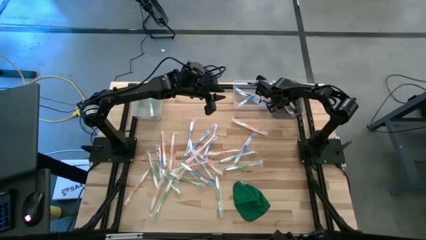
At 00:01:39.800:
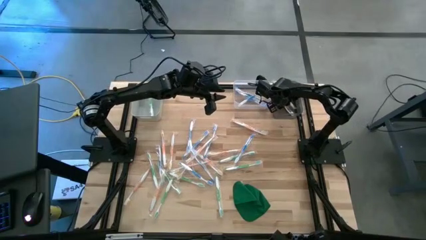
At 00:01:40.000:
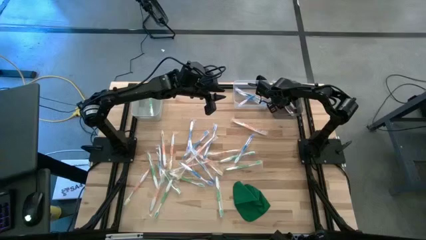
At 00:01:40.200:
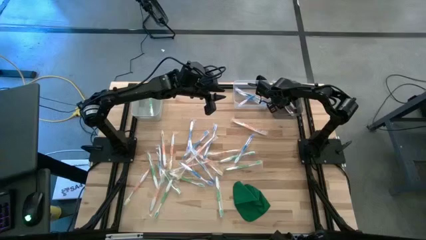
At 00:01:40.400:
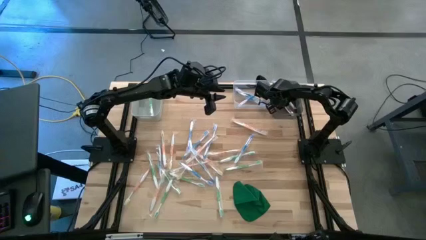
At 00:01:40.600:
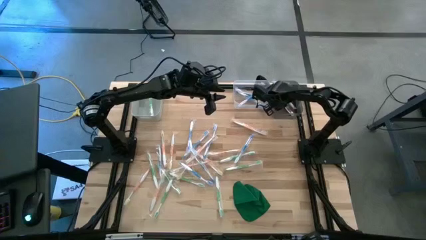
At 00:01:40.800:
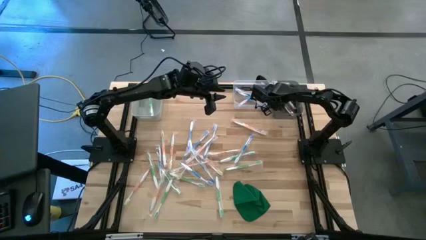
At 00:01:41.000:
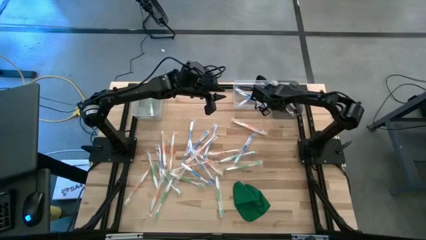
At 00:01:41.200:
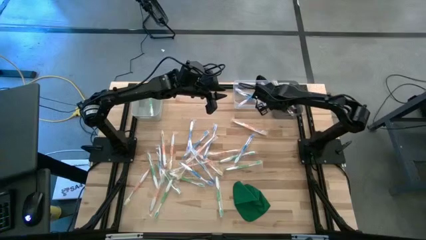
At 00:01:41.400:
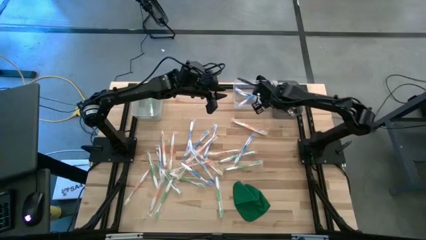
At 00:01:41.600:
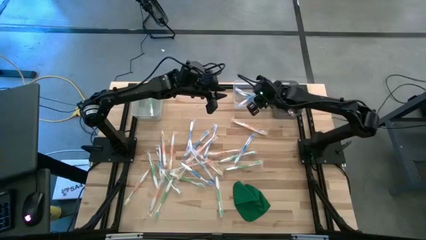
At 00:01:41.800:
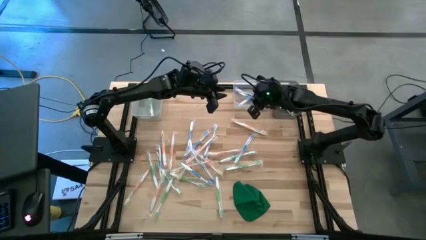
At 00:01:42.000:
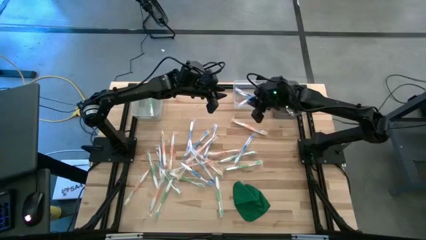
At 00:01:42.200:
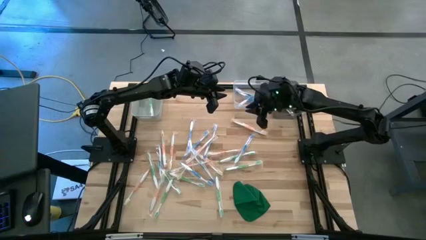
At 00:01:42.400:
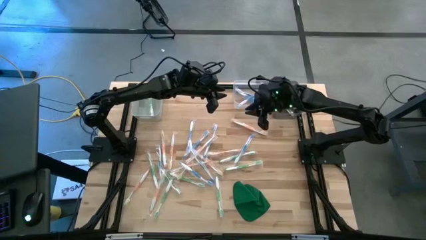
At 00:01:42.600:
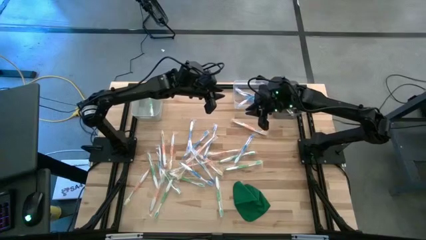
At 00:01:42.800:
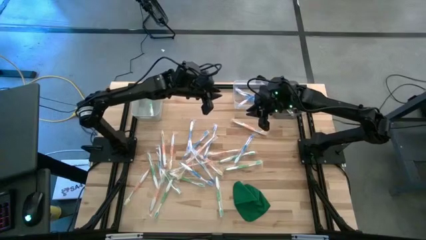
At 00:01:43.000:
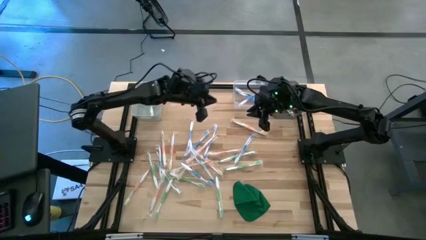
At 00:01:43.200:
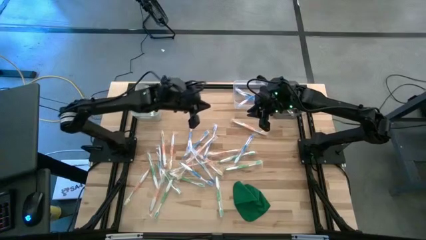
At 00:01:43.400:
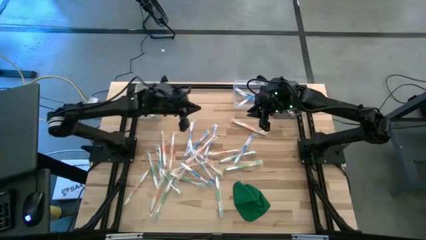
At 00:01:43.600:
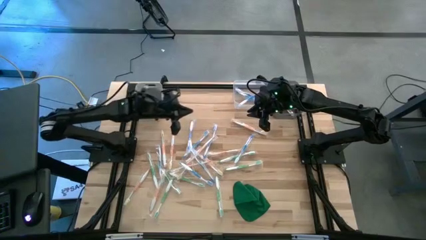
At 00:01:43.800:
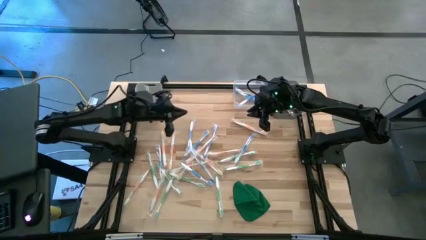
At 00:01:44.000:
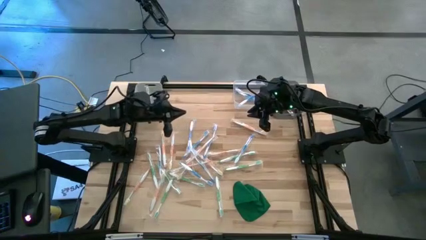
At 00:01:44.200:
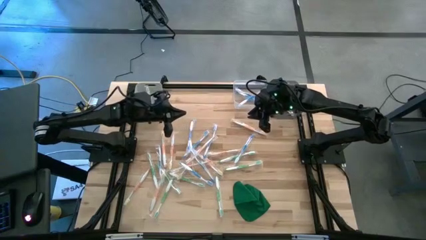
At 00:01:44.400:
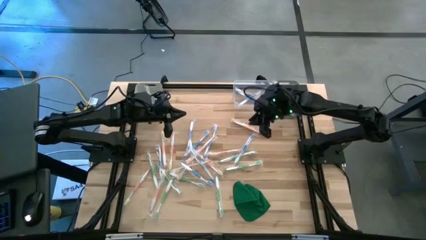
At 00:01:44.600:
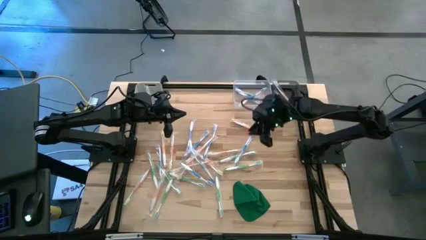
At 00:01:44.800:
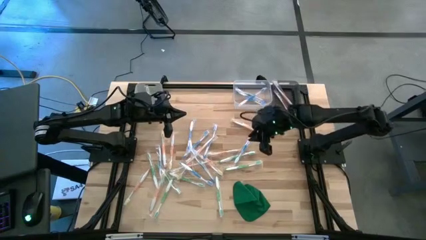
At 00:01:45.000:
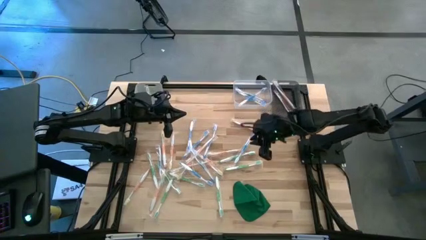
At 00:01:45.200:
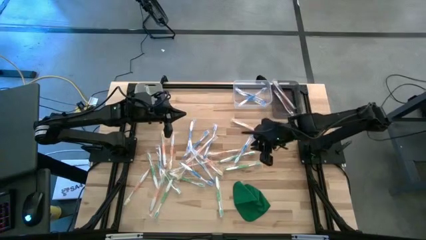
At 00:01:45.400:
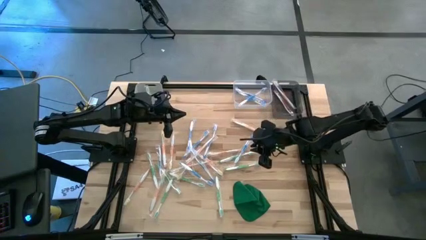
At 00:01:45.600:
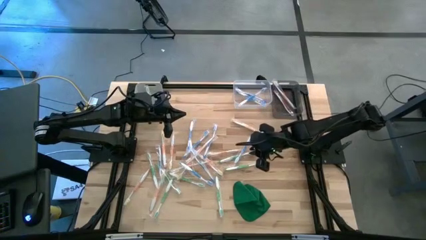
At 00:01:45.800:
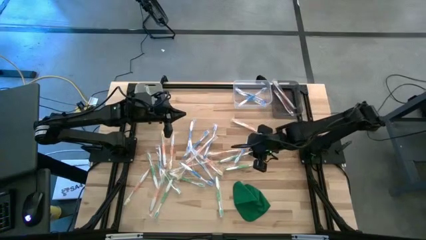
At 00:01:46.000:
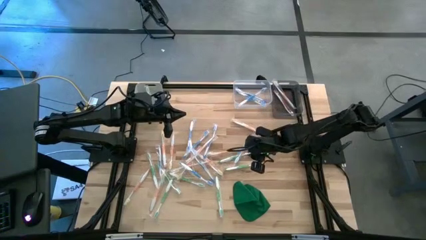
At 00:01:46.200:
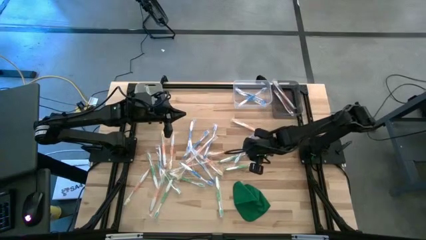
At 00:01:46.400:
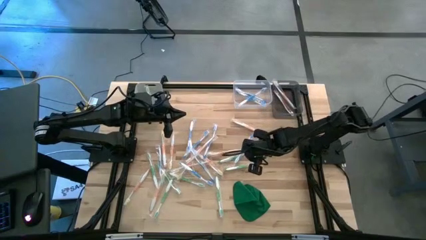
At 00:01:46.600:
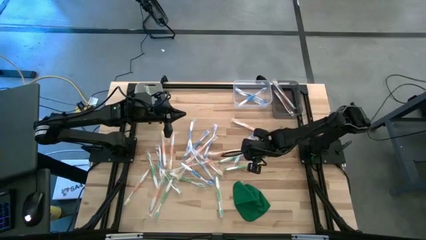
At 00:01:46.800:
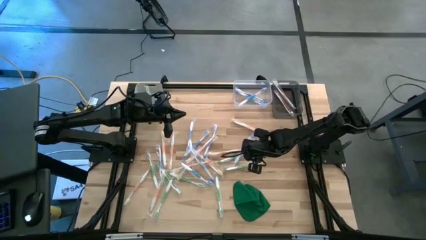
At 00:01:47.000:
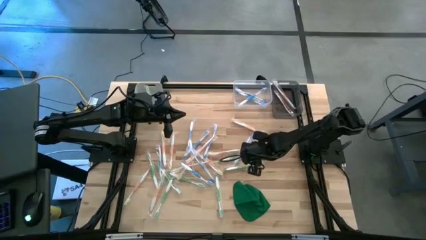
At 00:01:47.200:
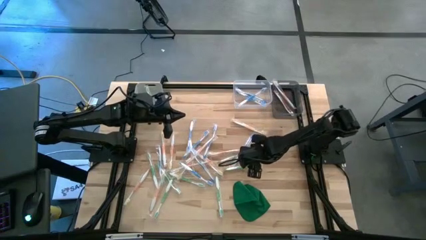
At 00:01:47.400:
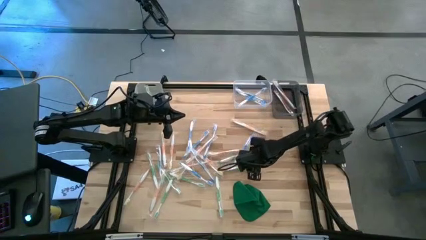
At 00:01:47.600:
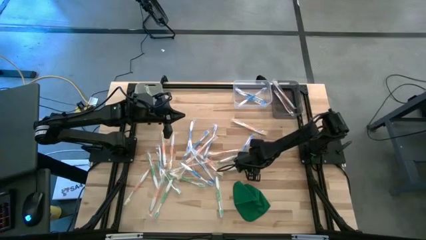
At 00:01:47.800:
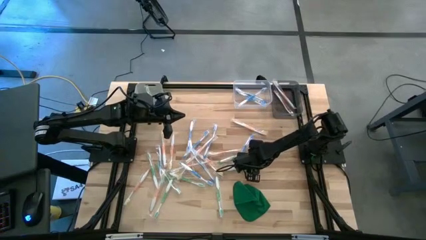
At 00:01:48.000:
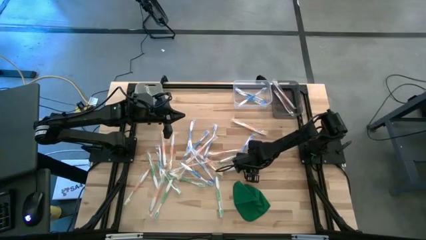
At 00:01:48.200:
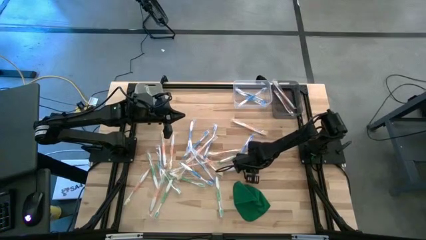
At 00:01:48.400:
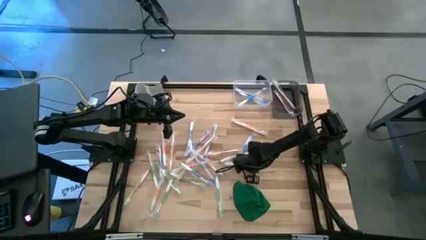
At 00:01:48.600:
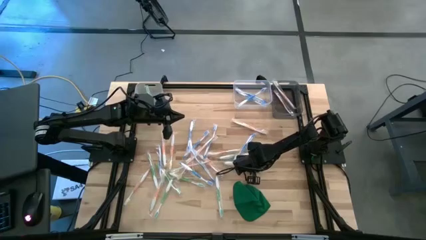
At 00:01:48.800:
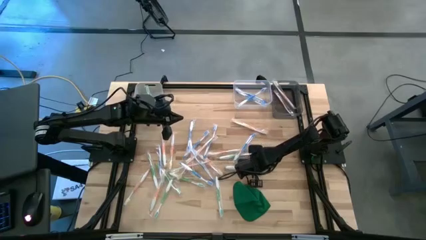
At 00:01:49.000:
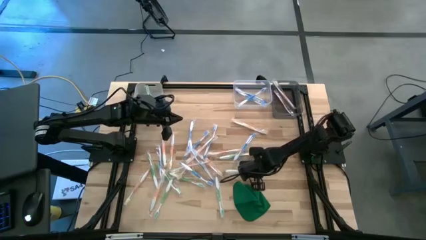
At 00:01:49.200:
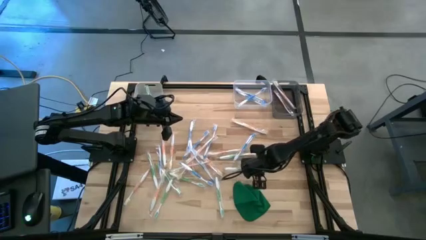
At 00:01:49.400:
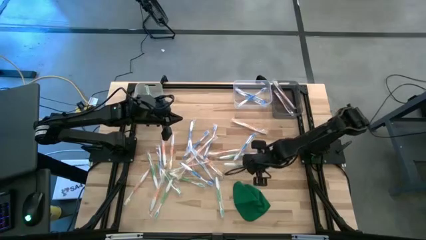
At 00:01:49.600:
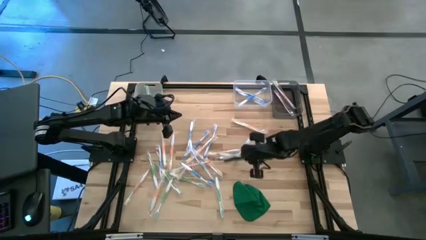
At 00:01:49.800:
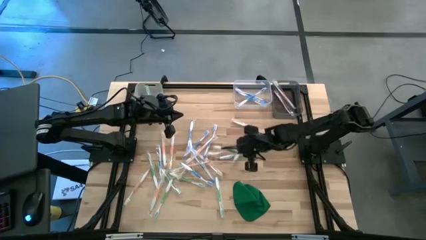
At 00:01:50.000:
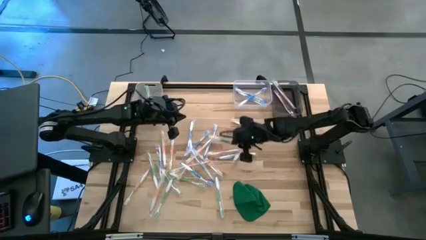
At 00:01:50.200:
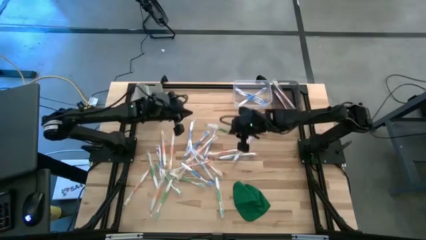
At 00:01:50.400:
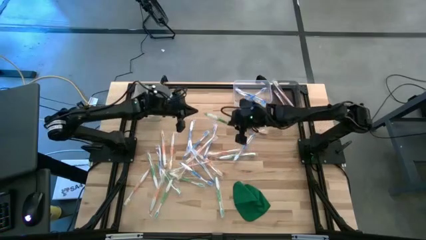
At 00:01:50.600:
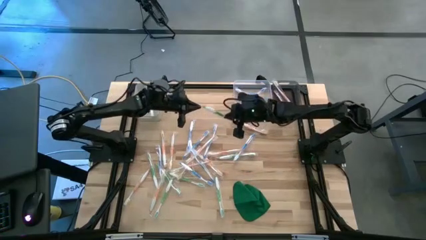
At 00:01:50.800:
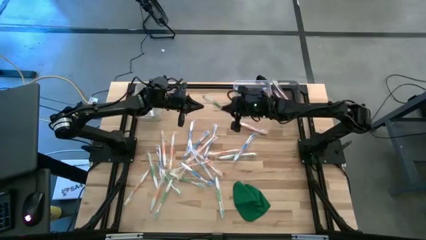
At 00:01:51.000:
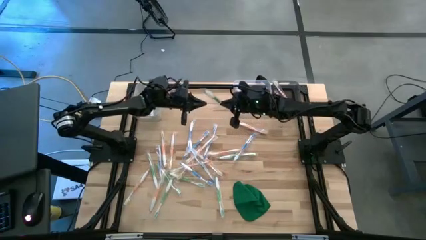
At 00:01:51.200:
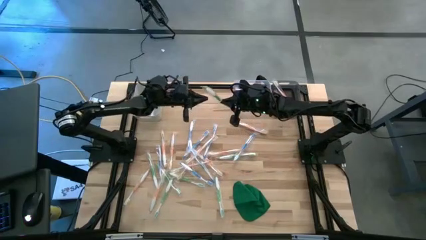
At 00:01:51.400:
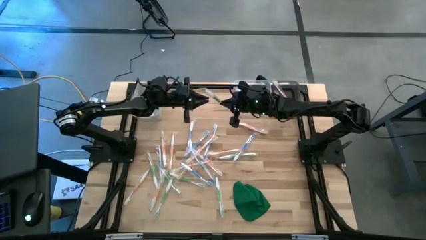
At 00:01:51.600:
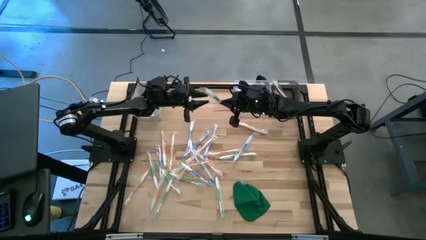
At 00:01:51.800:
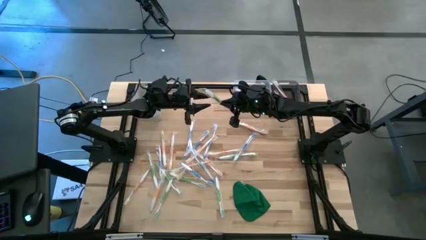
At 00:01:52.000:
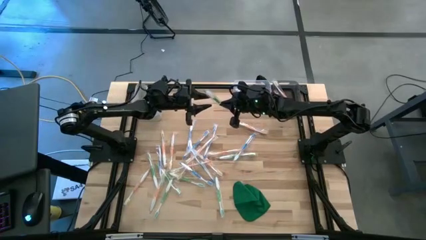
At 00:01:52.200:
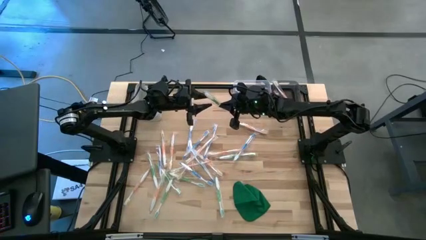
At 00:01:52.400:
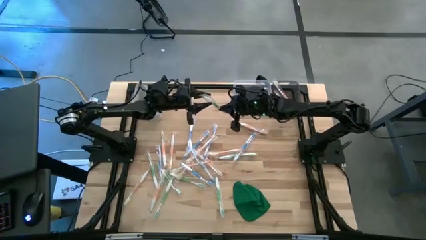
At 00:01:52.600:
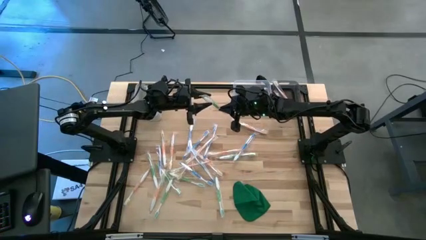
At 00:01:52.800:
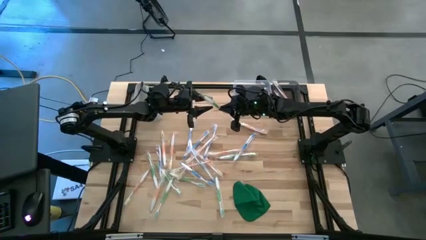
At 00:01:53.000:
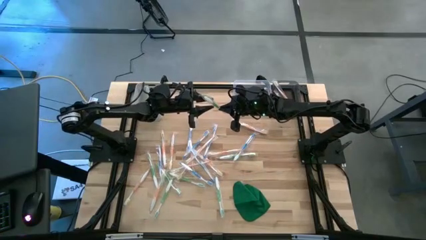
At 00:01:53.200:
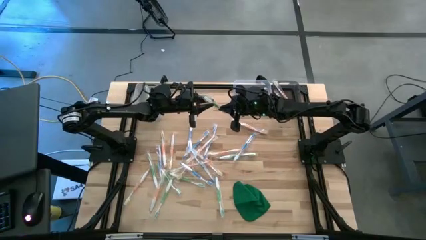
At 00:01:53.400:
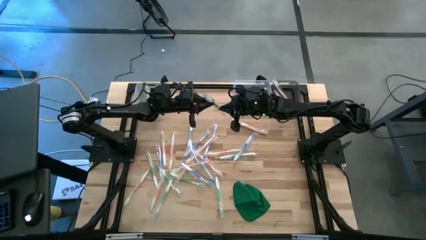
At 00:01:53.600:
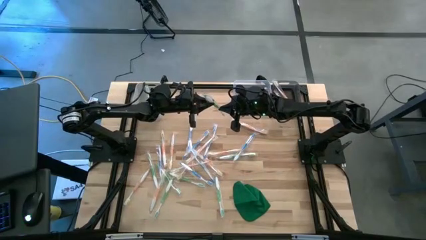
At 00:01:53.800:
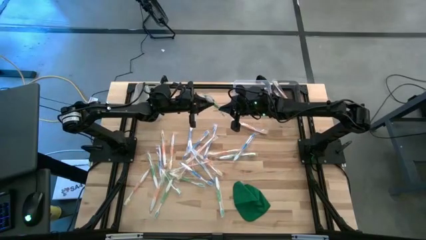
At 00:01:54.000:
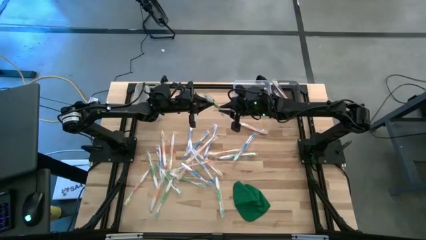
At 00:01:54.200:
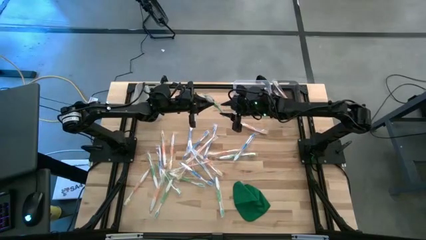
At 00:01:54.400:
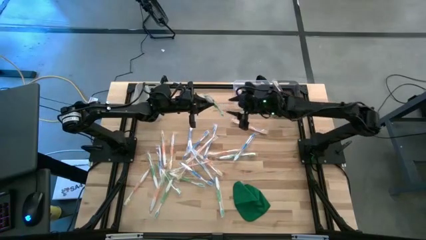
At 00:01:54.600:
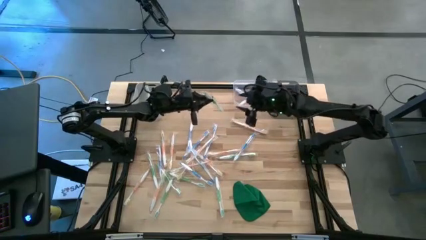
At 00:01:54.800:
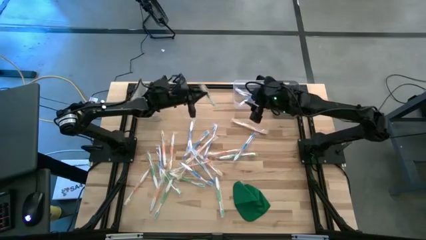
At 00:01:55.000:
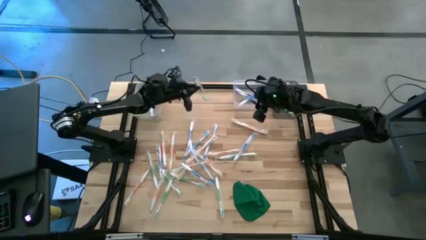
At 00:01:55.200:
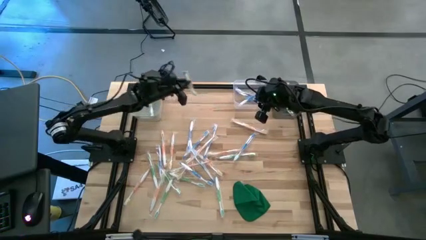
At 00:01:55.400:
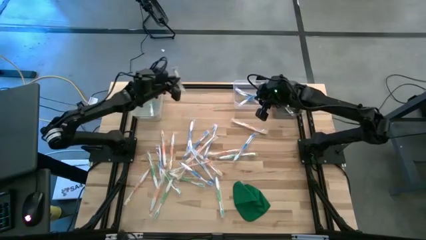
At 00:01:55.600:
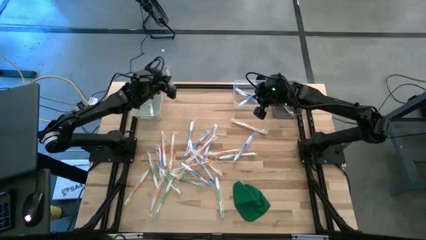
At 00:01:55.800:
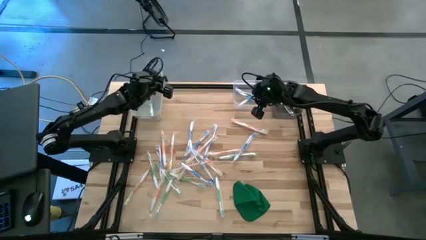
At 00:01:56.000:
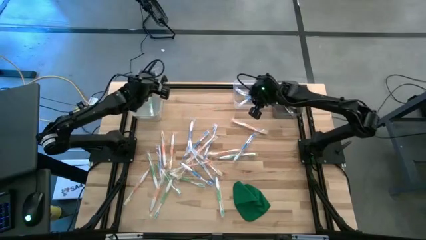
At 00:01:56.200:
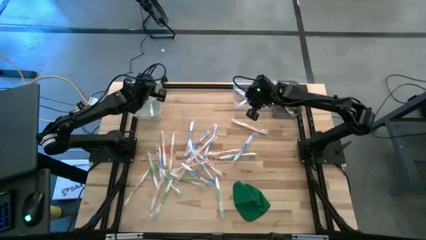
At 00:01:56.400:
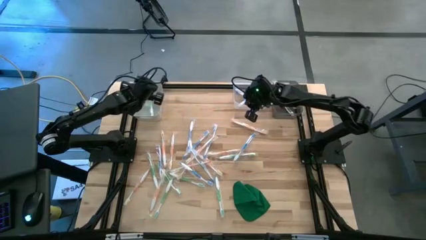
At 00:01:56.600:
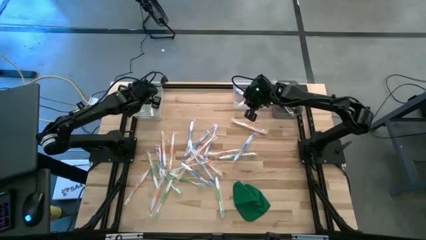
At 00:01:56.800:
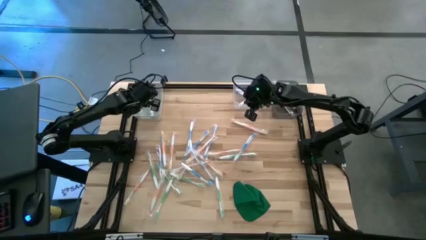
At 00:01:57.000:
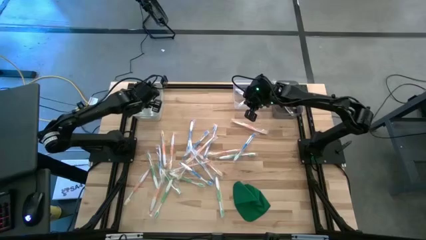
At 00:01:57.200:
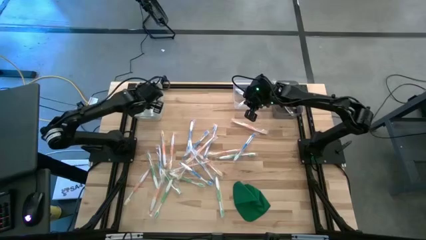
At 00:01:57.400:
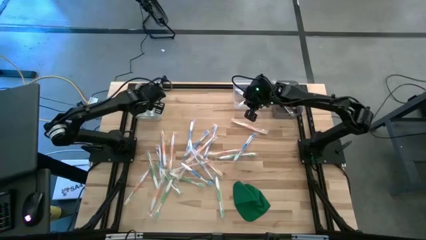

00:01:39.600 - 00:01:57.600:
Task: Pick & Place Toothbrushes
Put the green toothbrush into the gray bin
